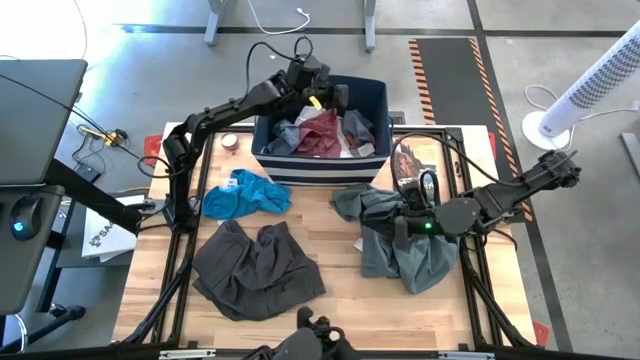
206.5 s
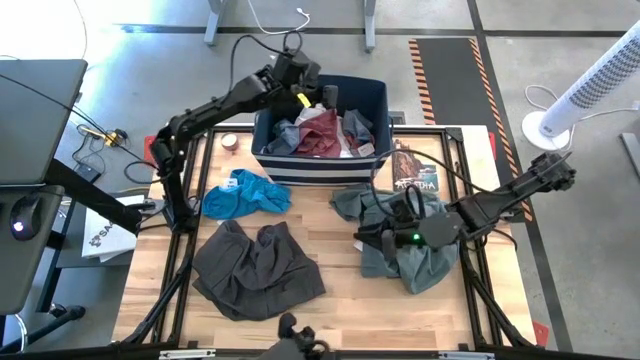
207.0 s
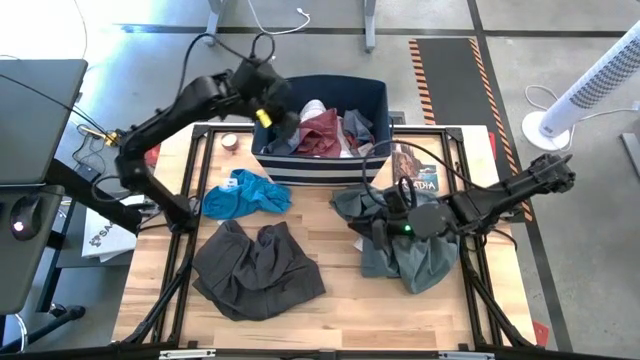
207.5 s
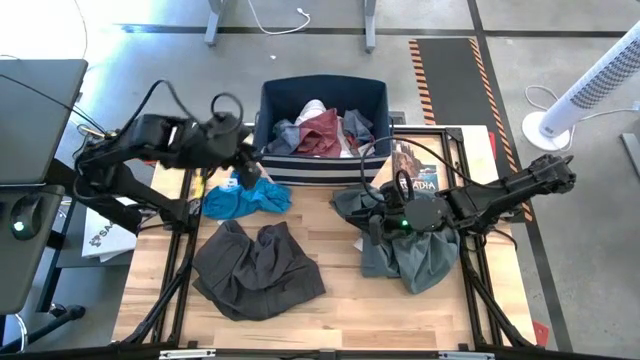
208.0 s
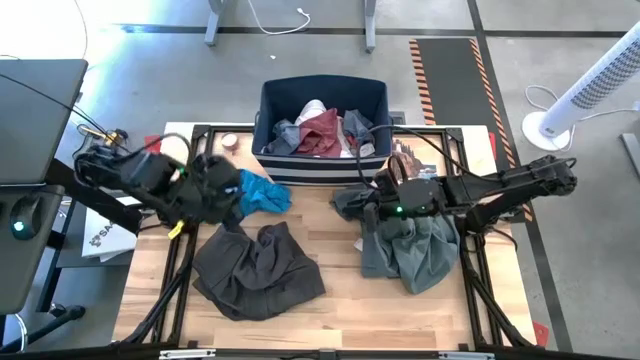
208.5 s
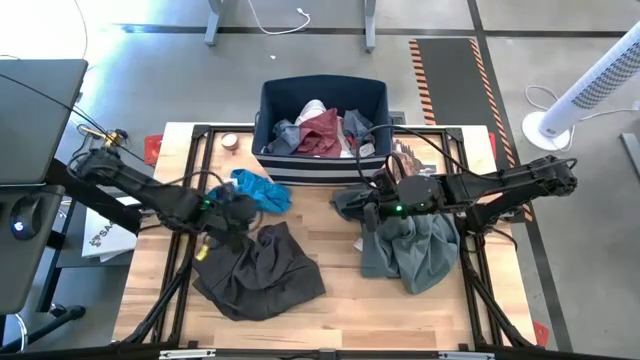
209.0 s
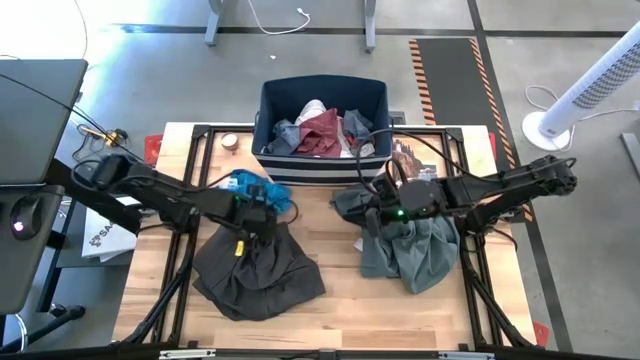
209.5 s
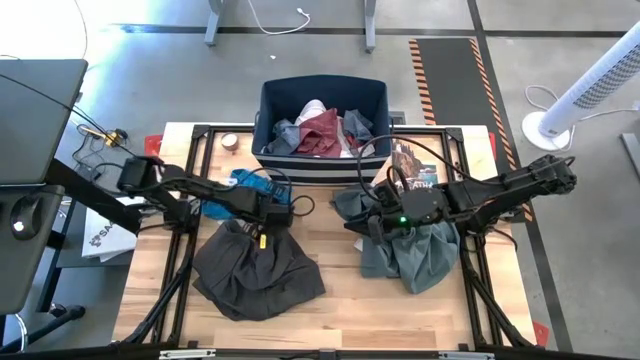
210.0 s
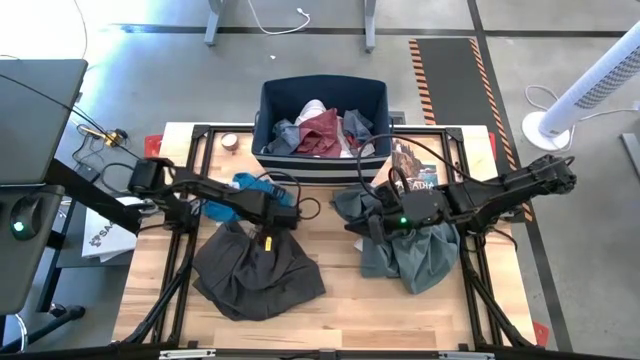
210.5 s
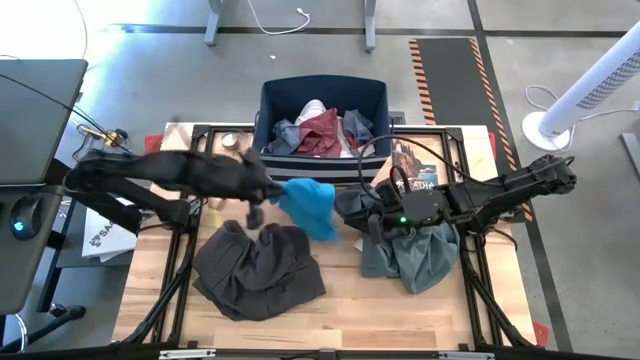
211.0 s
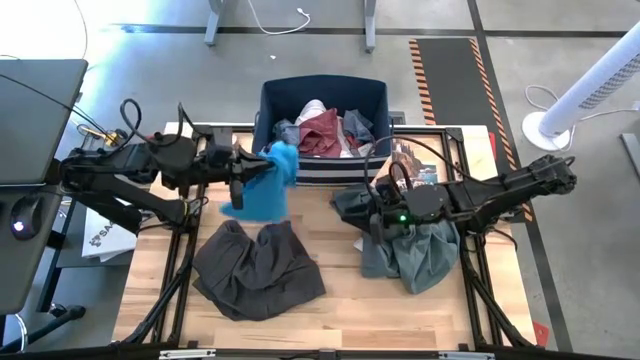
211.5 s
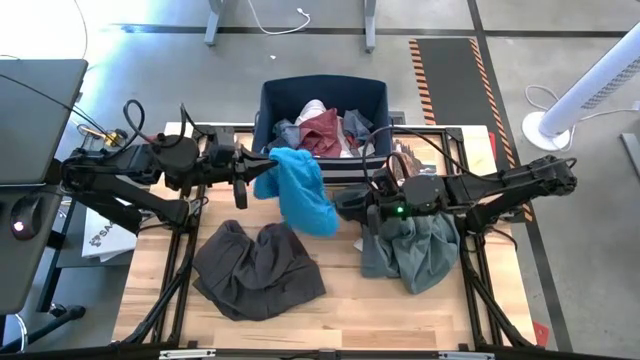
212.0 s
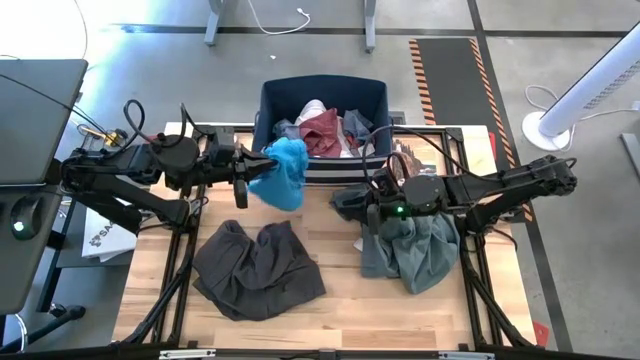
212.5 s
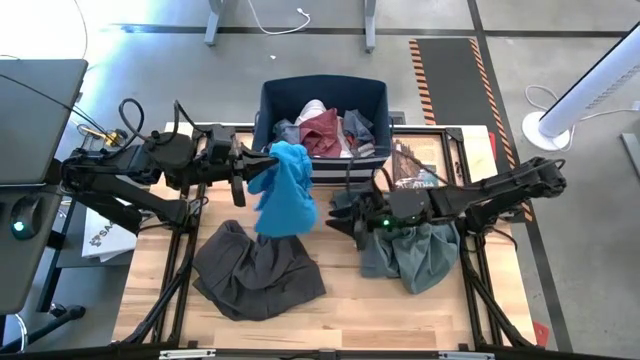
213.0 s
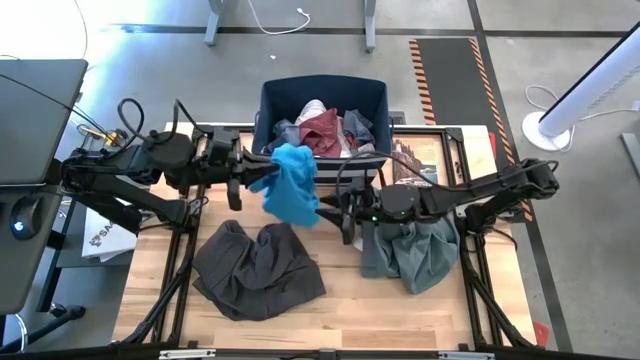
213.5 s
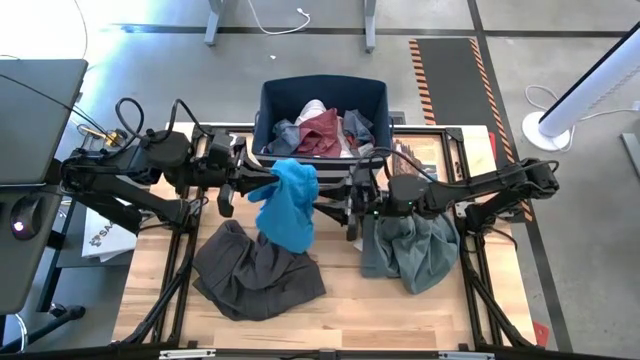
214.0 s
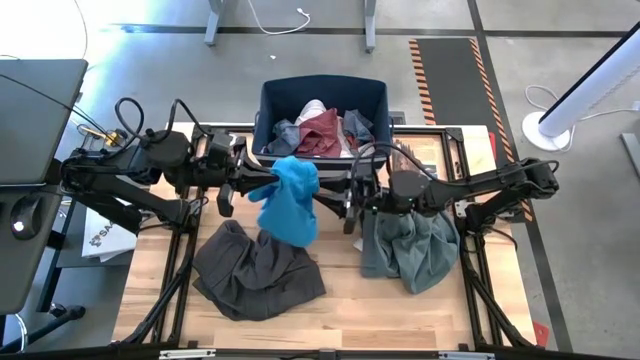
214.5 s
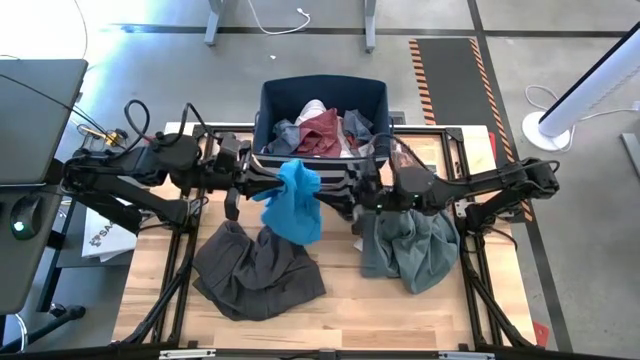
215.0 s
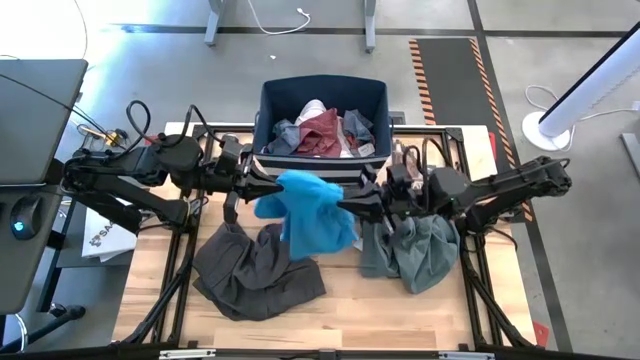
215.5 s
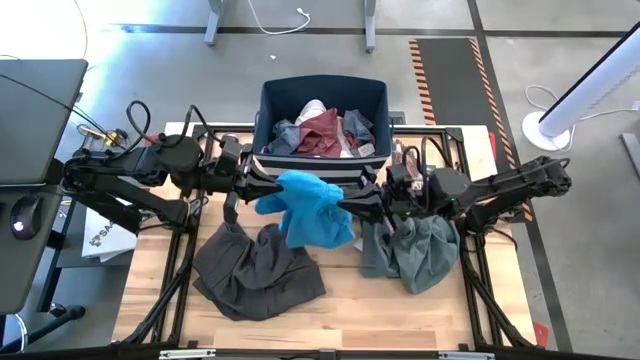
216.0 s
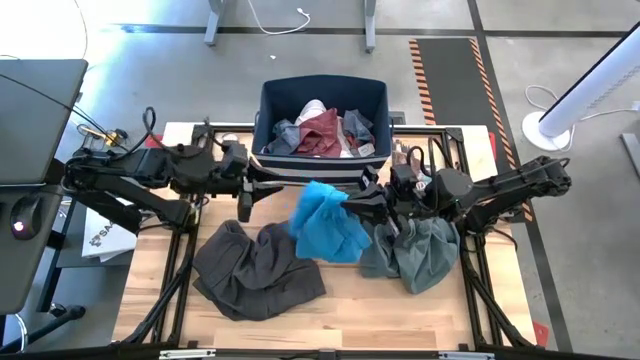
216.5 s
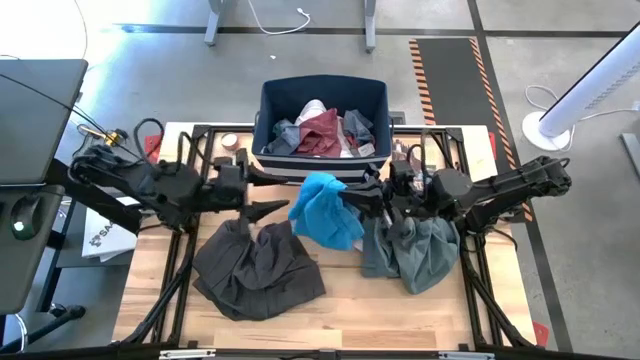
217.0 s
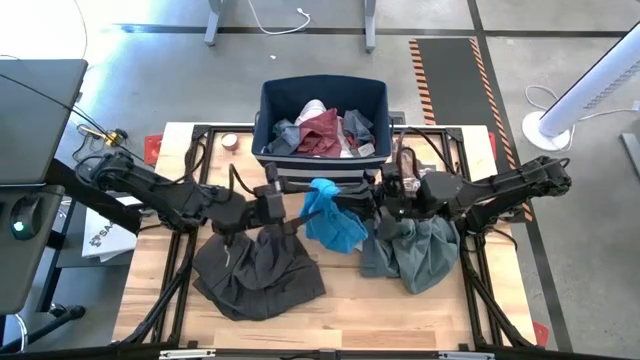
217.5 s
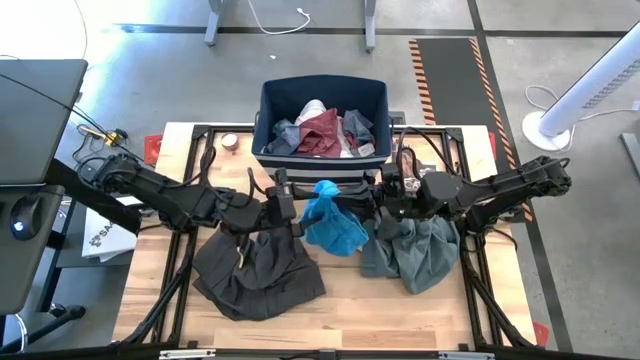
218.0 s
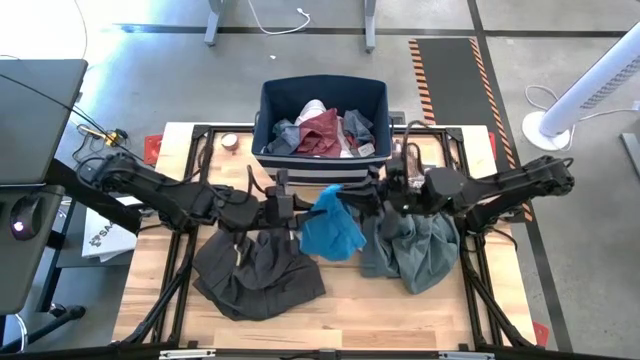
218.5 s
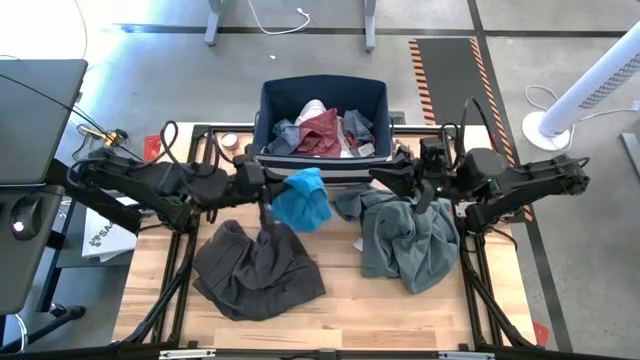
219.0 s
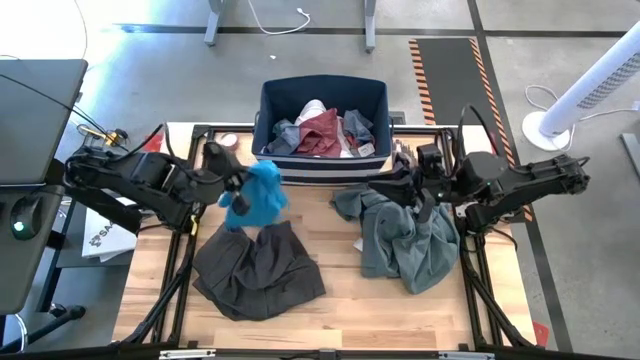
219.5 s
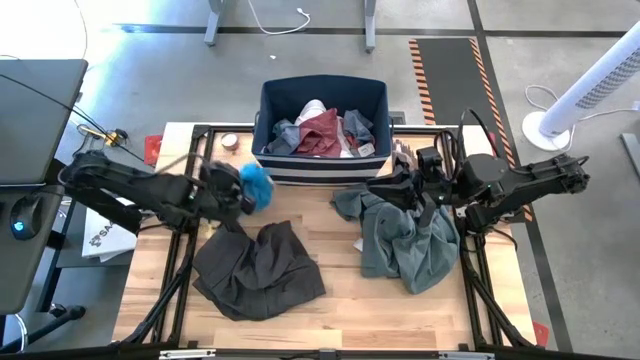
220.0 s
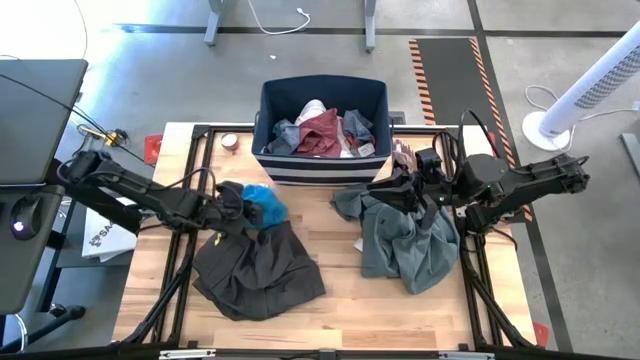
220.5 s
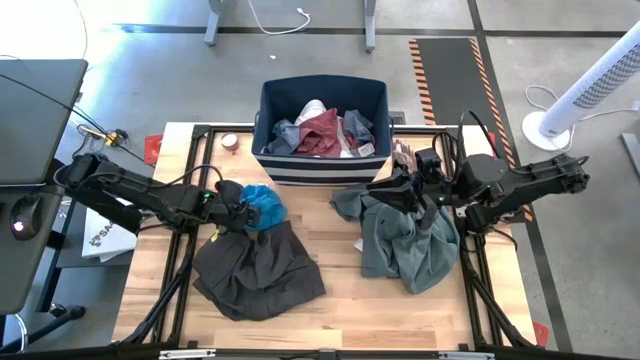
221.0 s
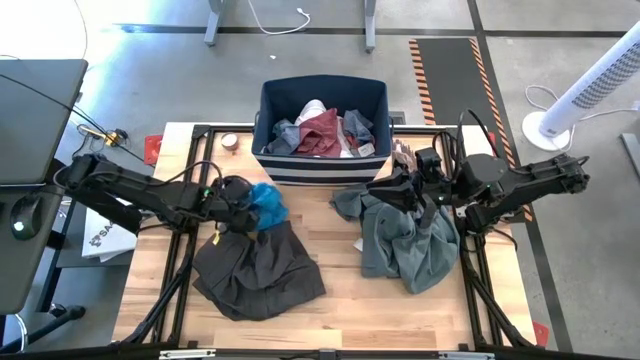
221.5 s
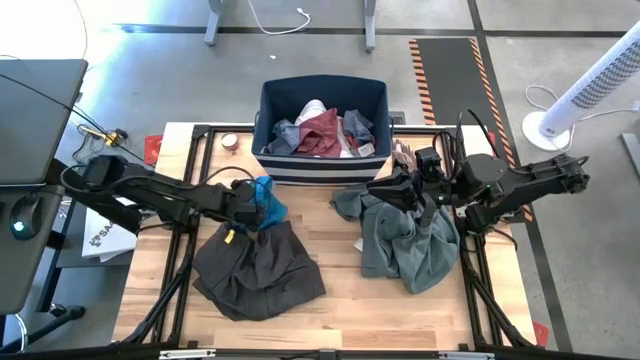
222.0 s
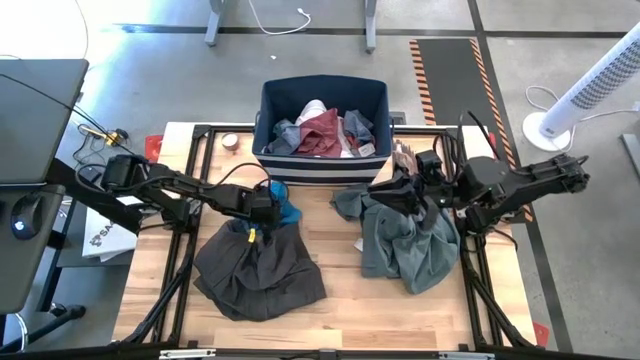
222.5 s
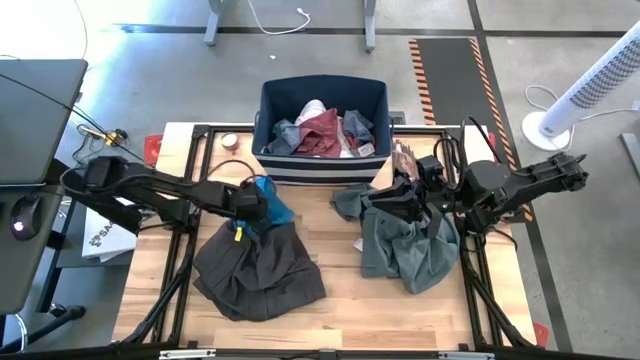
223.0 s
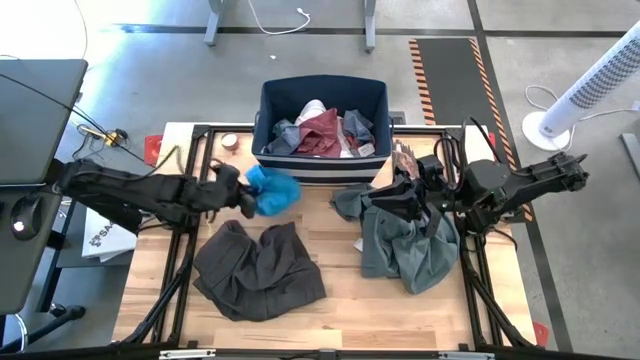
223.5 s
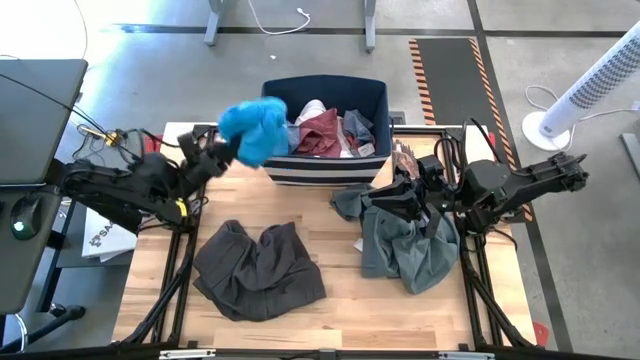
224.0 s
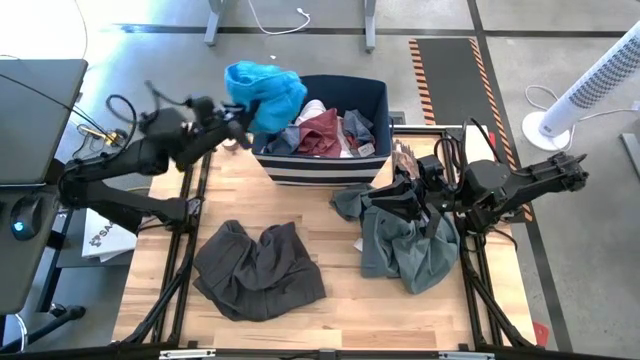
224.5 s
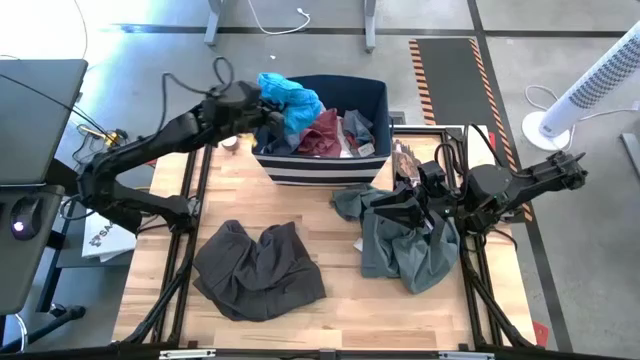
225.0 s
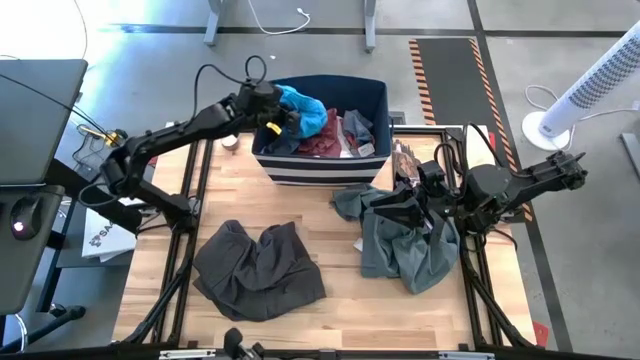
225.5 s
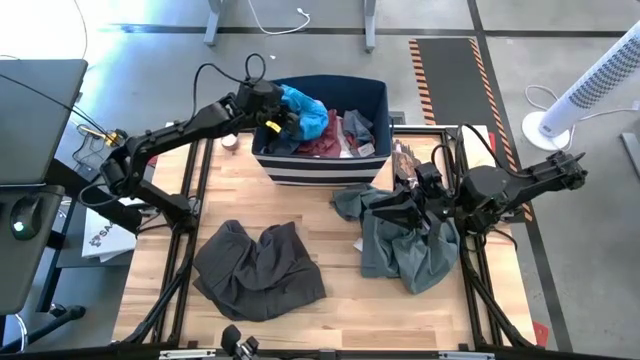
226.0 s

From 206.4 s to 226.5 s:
Task: Sort clothes
Put the blue short into the blue laundry bin

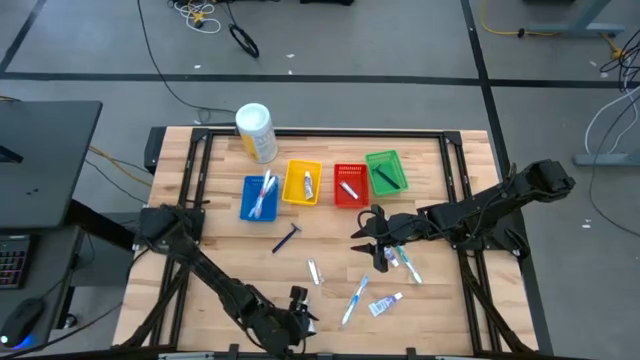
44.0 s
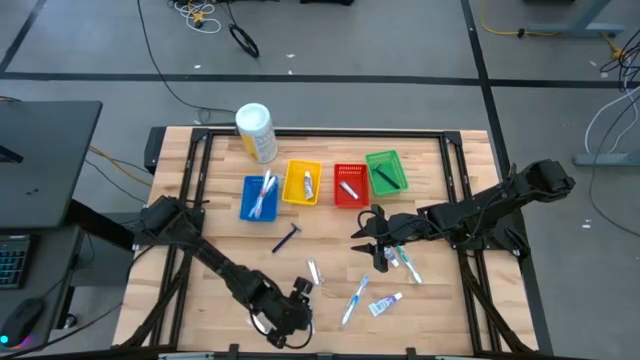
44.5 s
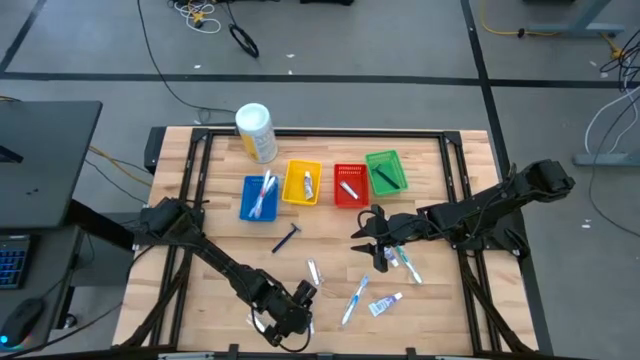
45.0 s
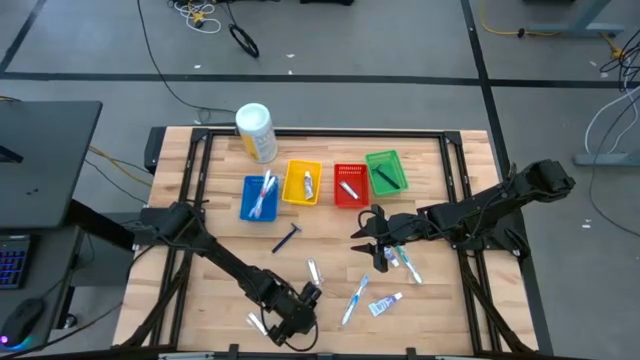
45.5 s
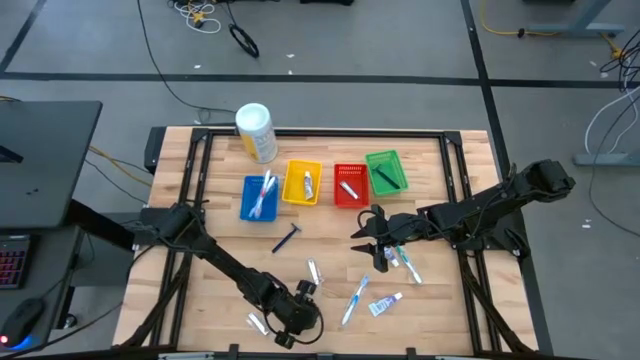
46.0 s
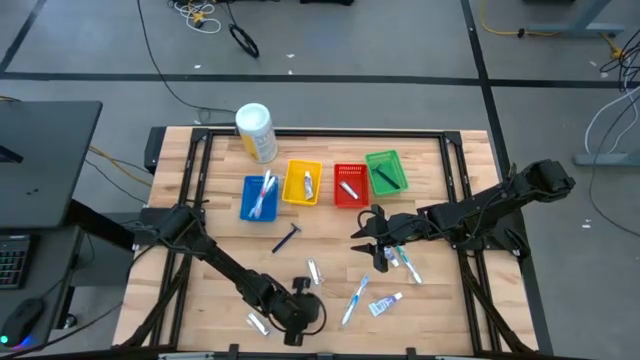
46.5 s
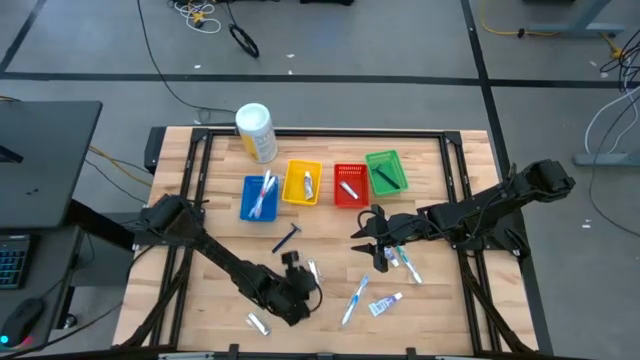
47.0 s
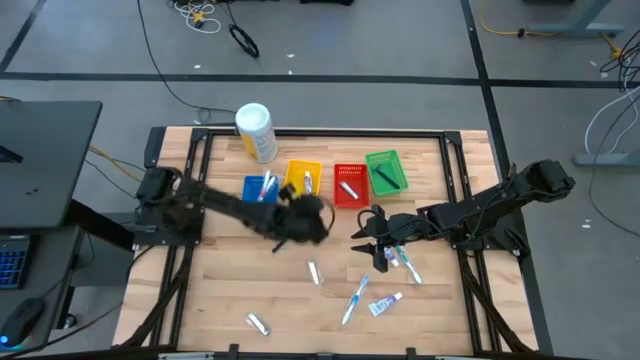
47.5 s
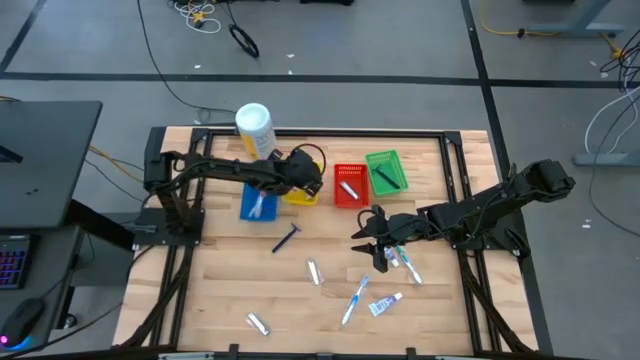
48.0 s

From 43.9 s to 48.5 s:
Task: Pick & Place Travel size toiletries
Put the white toothpaste into the yellow bin
